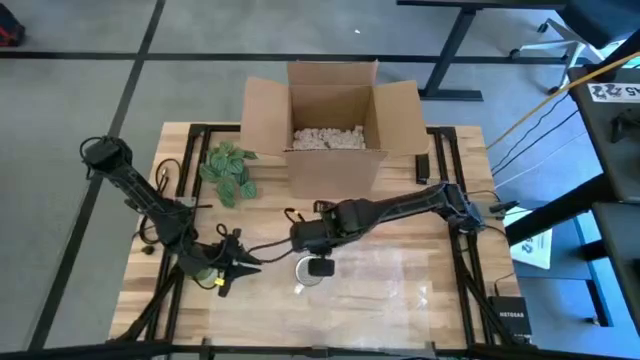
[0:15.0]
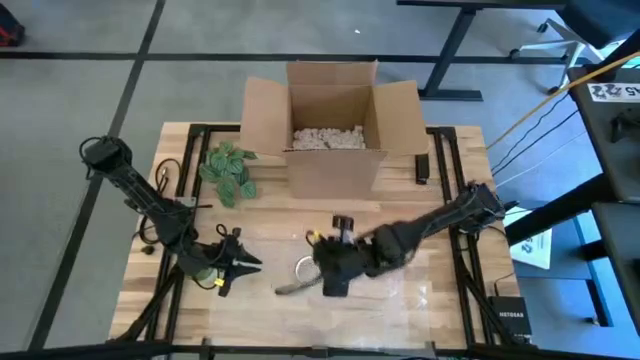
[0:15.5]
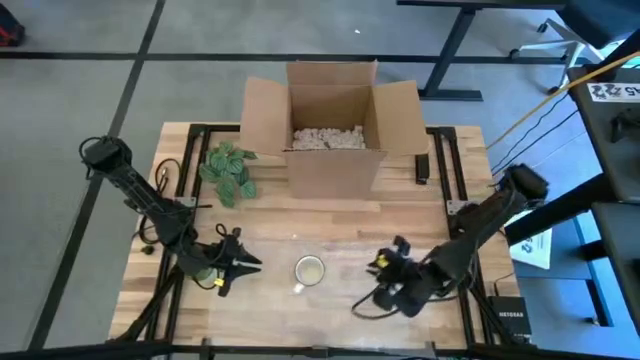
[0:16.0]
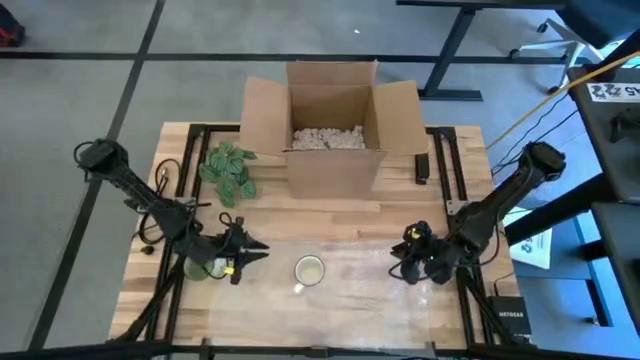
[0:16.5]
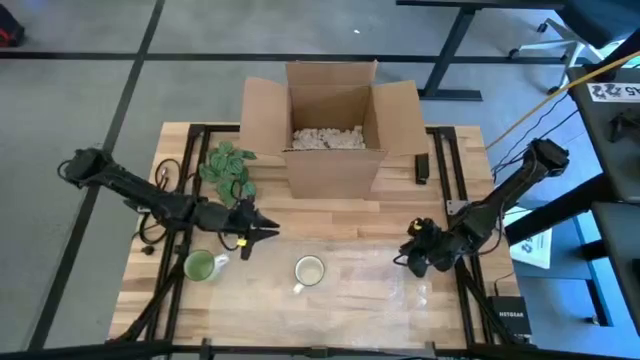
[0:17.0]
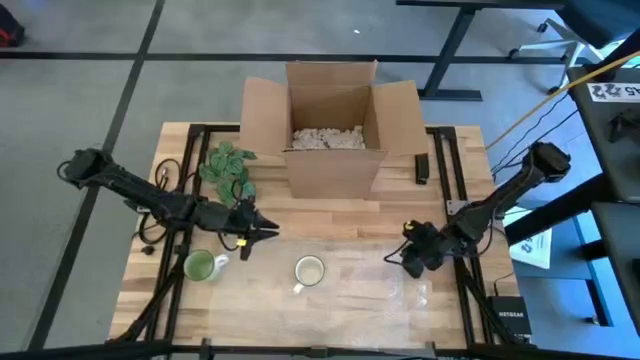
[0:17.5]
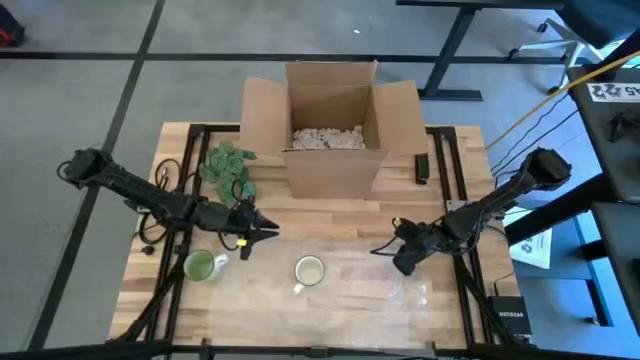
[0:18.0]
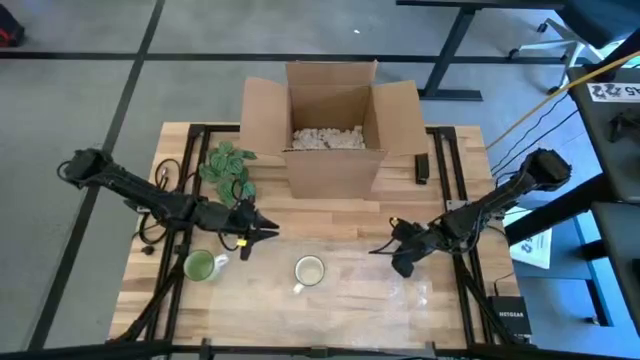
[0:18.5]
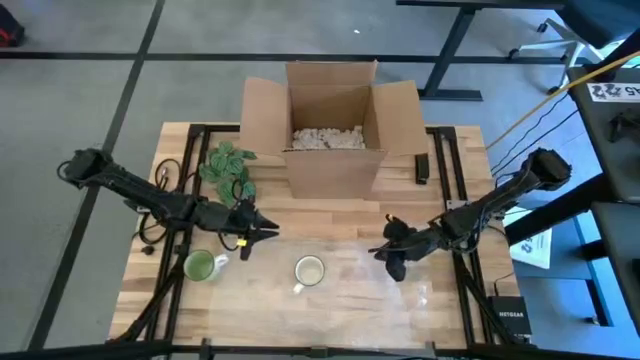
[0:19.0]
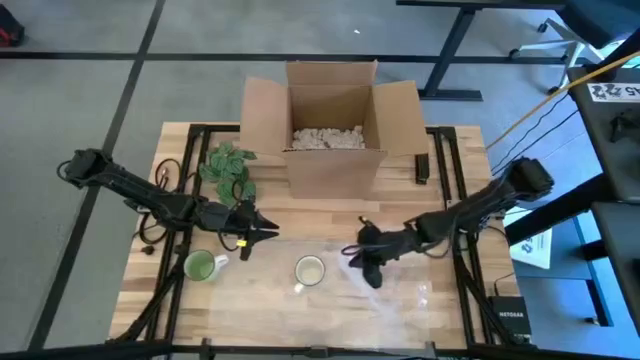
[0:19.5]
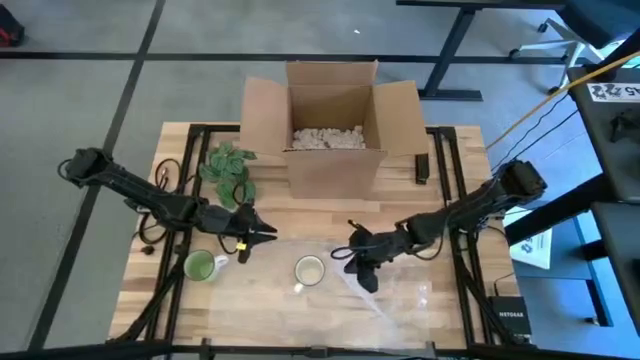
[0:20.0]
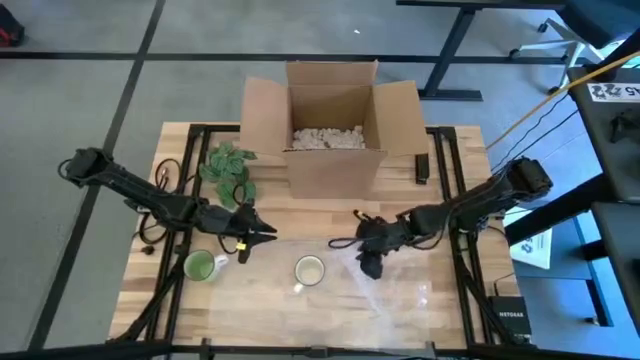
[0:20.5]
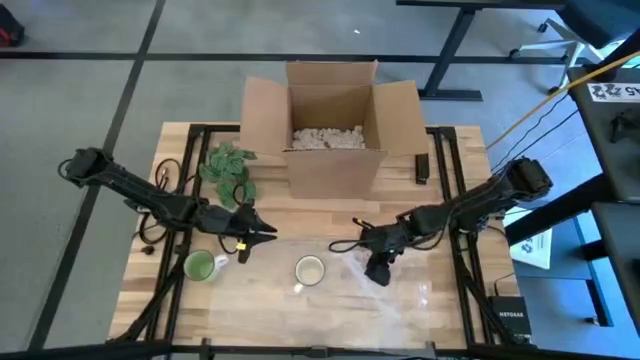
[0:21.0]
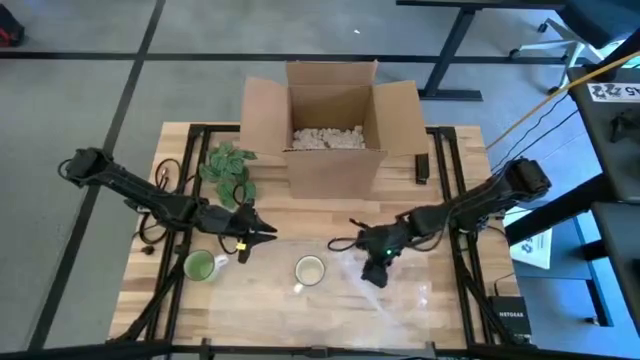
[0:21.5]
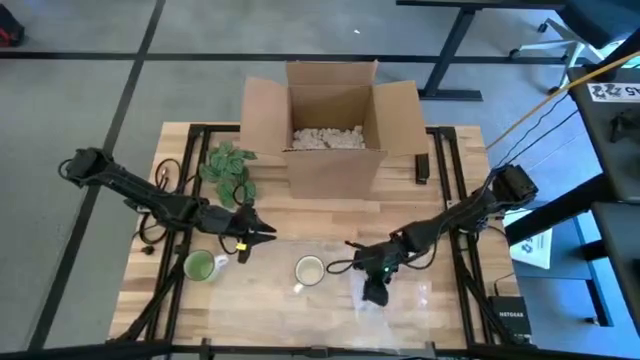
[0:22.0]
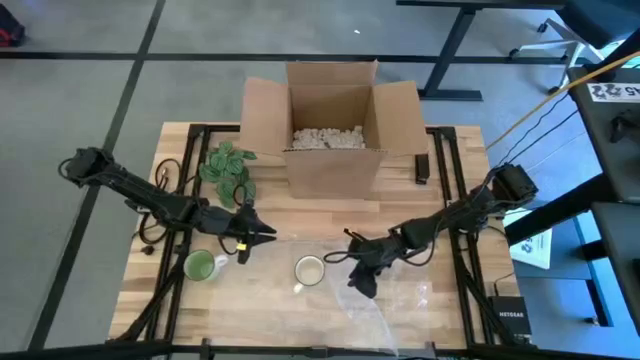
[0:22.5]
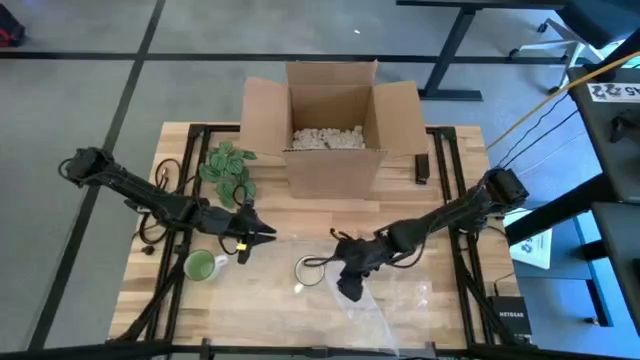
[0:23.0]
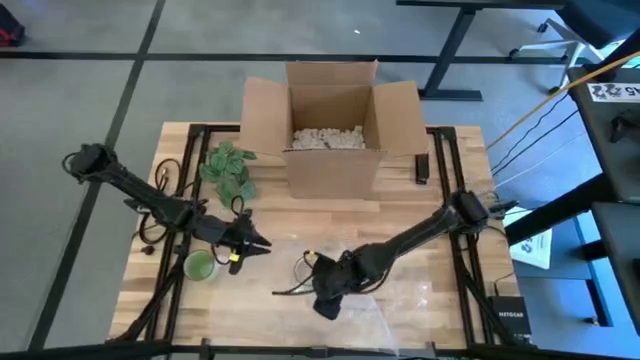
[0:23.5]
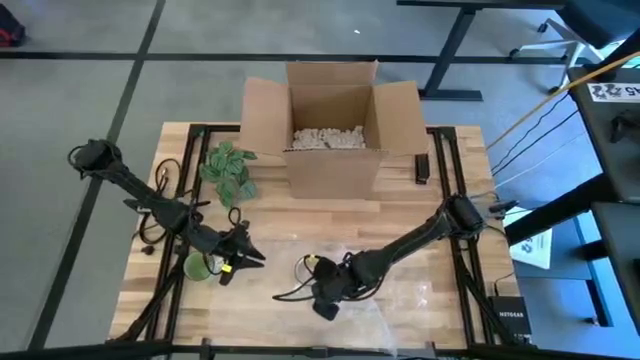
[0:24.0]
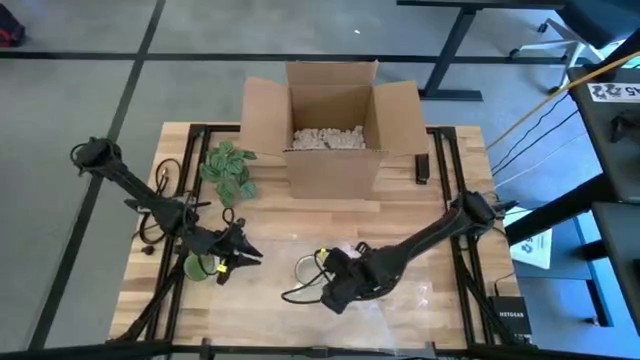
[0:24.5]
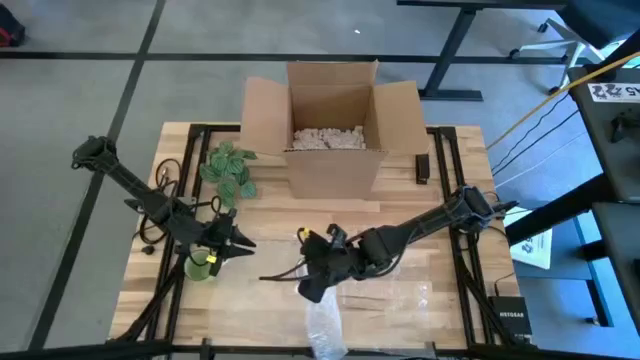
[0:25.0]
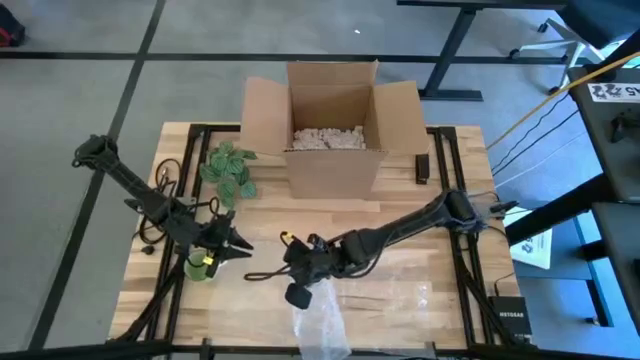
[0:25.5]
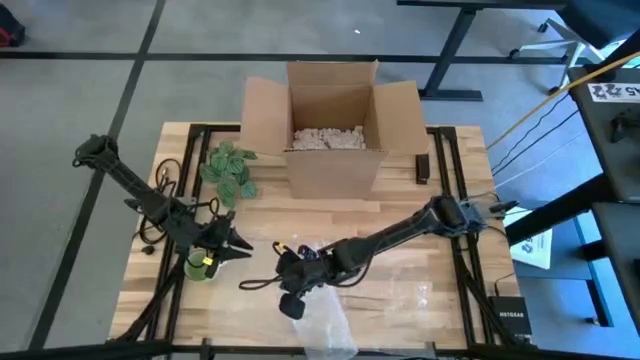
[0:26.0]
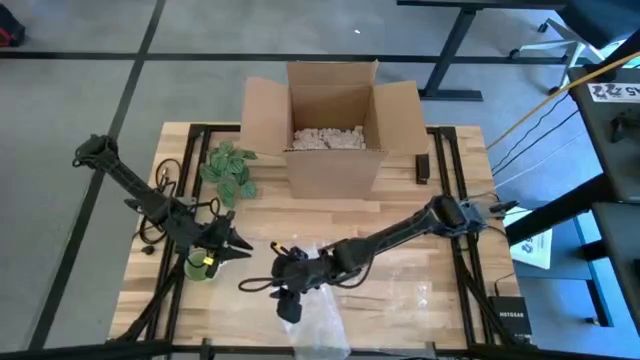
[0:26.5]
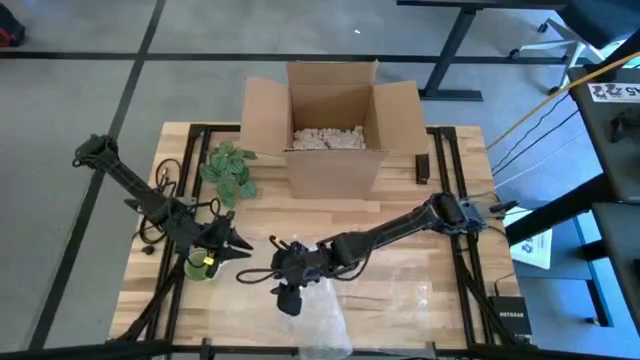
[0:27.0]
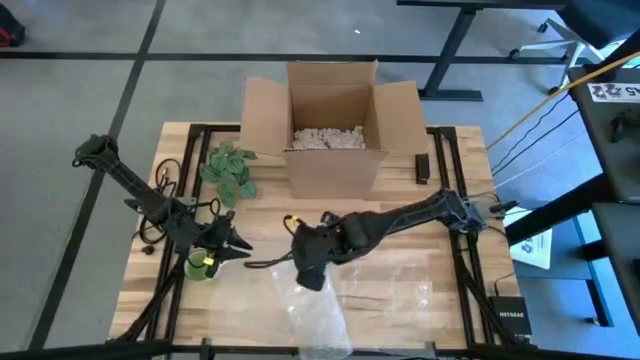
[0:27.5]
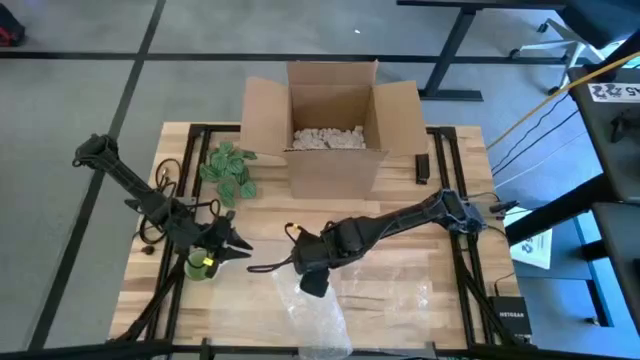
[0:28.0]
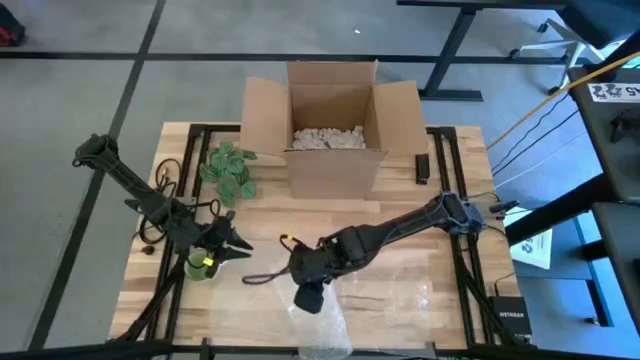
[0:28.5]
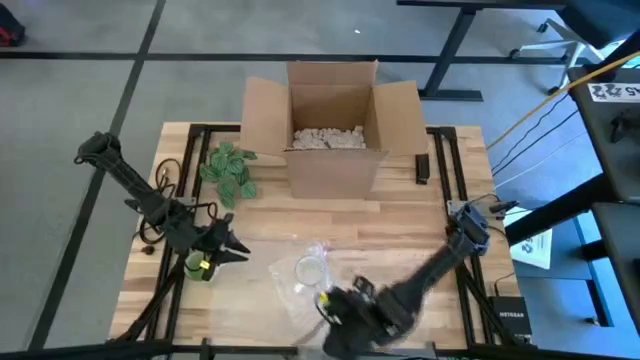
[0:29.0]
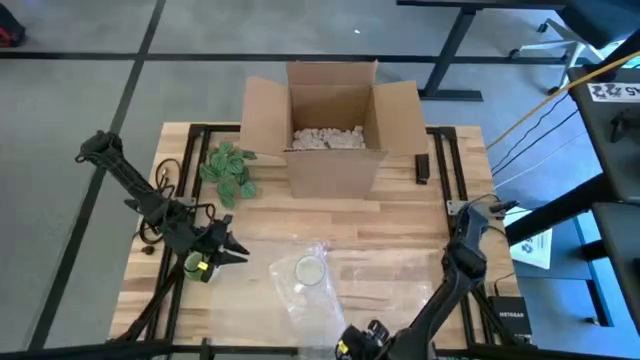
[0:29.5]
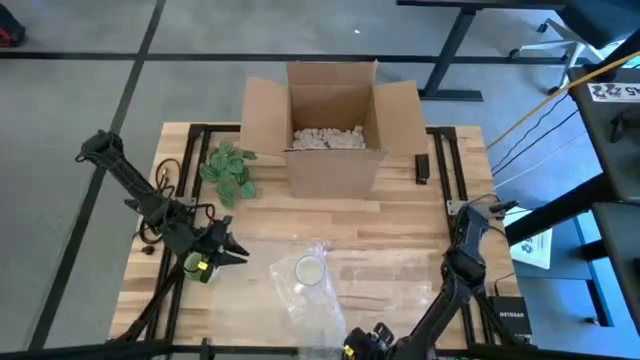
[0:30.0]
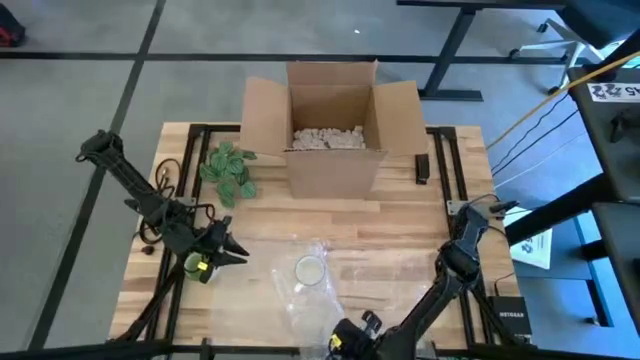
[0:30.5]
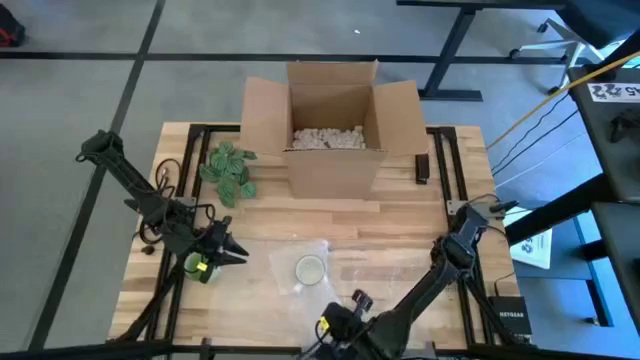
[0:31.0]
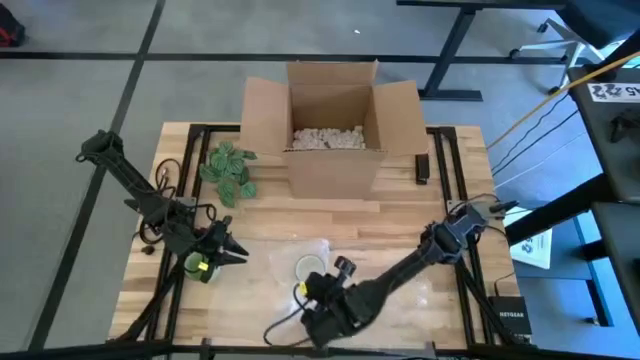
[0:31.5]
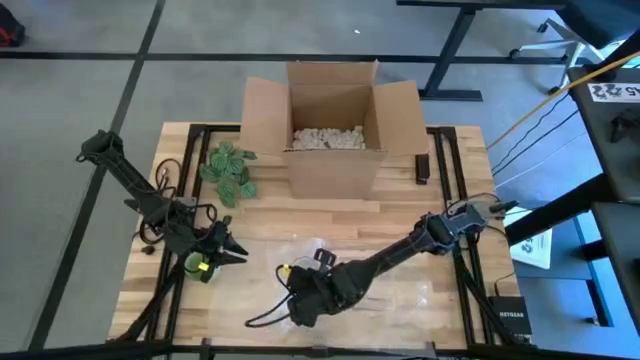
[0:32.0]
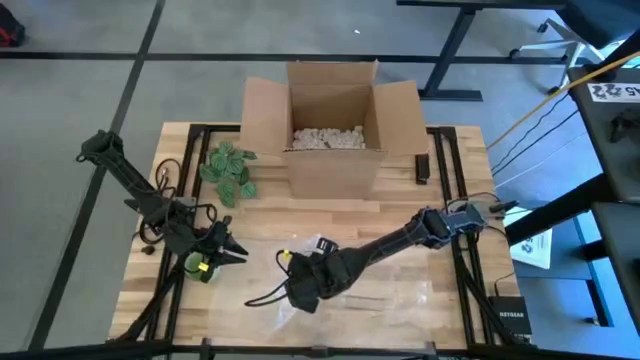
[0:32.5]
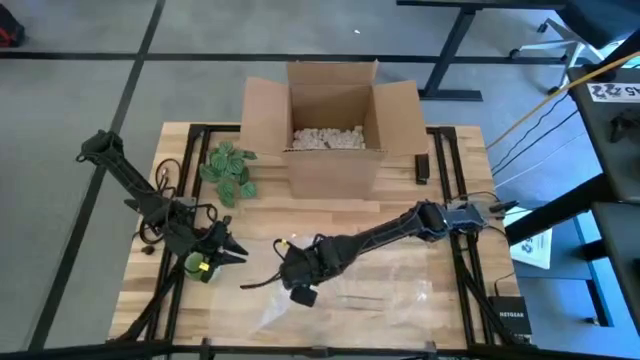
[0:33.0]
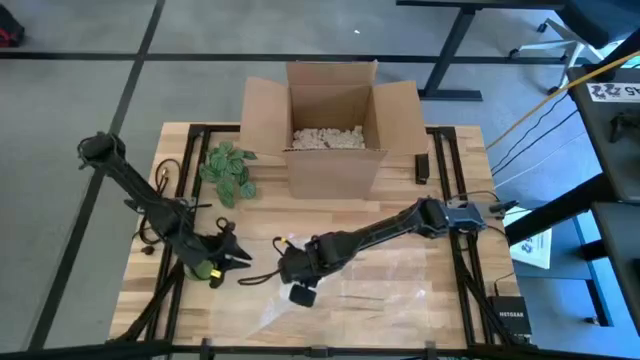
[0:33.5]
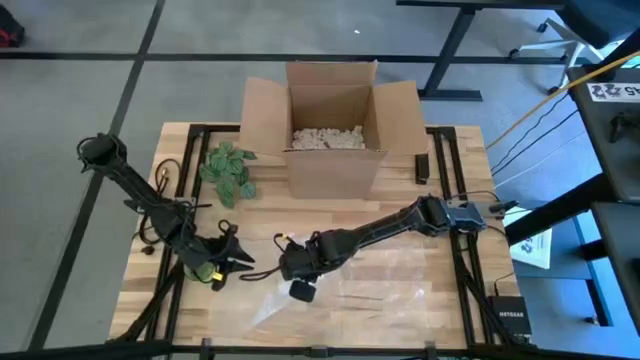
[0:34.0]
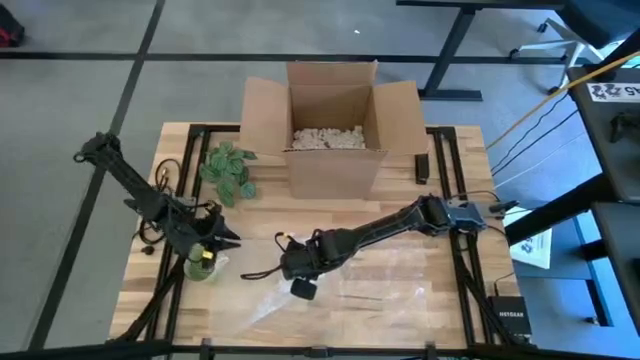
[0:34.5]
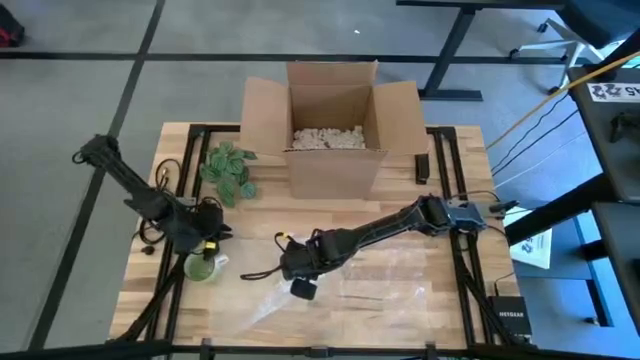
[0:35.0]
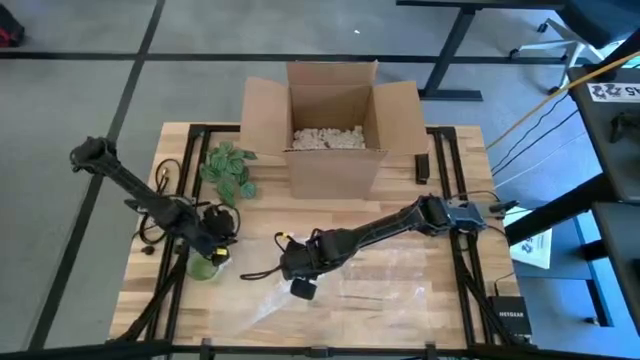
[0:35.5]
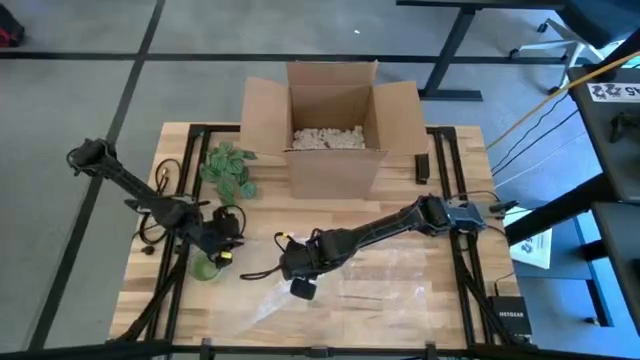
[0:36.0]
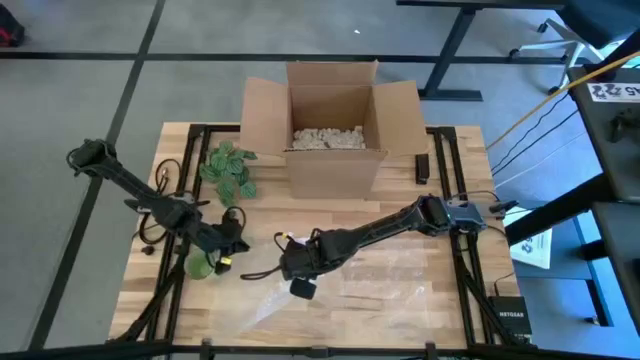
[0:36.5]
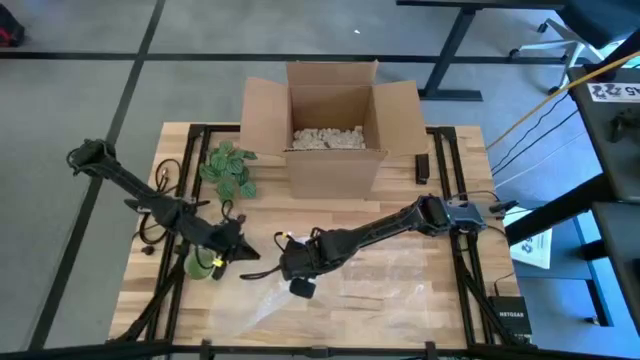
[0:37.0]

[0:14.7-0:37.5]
Task: wrap mug
Wrap the blue mug in bubble wrap
